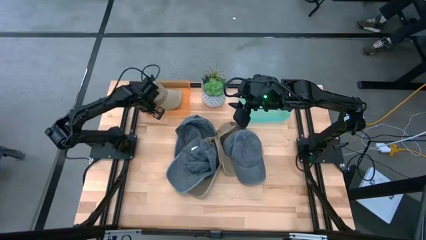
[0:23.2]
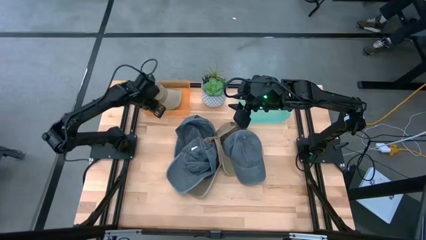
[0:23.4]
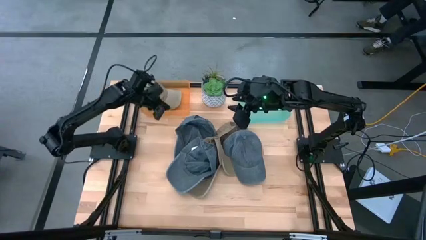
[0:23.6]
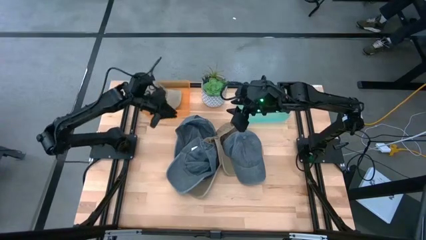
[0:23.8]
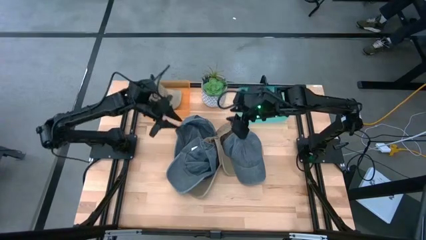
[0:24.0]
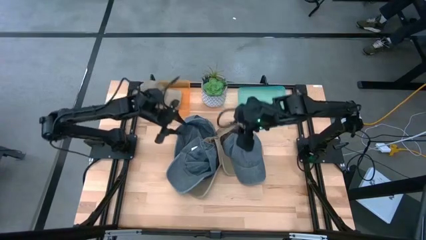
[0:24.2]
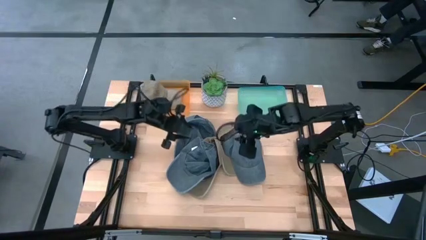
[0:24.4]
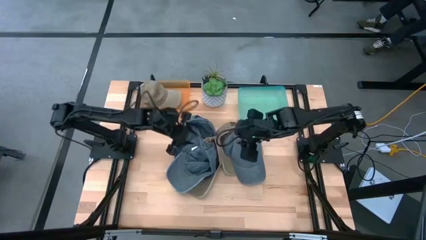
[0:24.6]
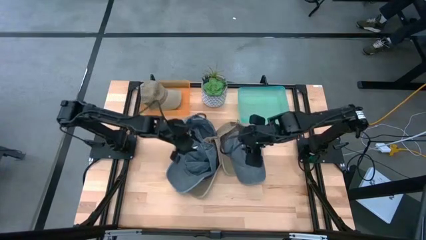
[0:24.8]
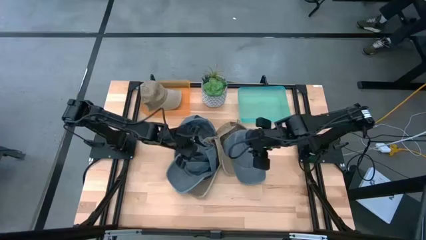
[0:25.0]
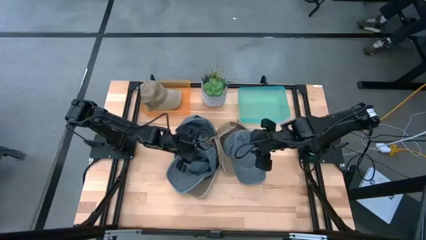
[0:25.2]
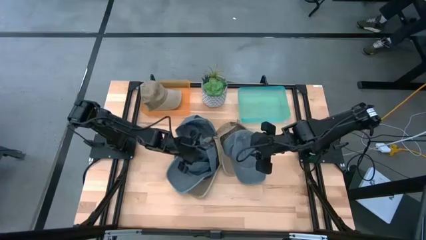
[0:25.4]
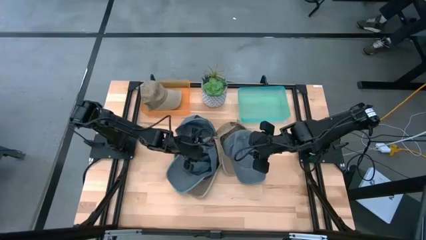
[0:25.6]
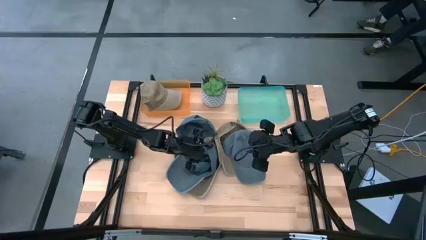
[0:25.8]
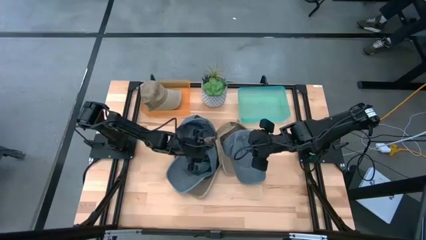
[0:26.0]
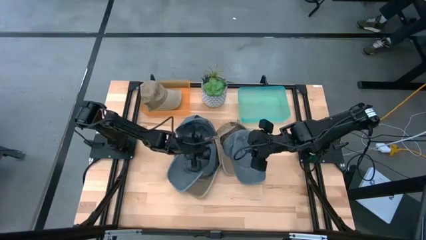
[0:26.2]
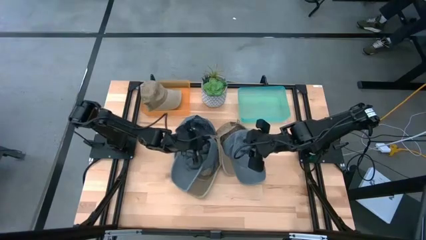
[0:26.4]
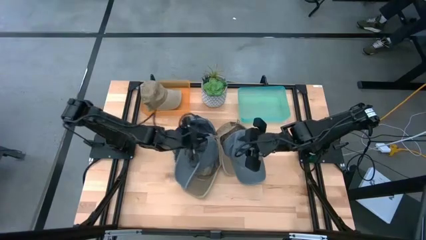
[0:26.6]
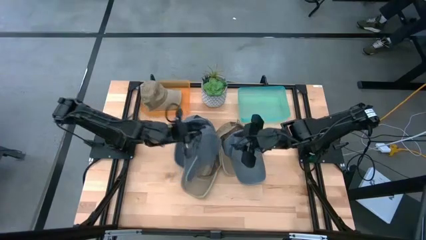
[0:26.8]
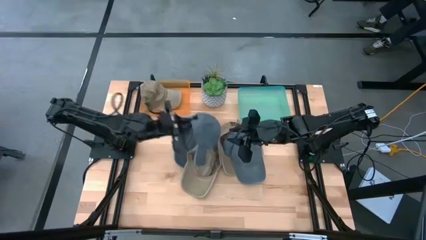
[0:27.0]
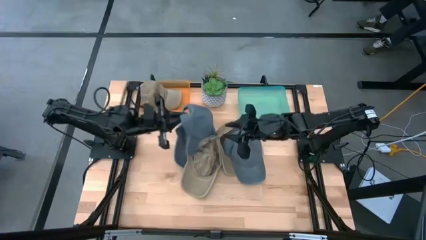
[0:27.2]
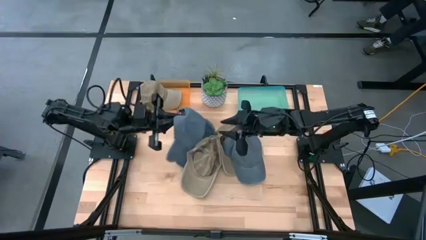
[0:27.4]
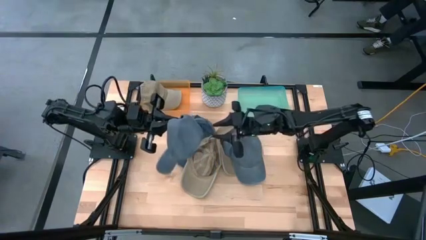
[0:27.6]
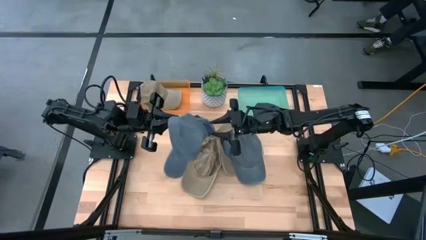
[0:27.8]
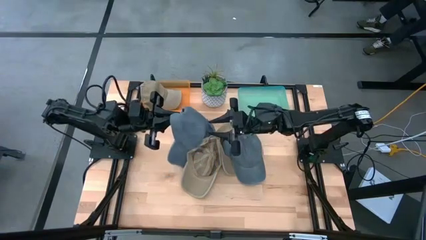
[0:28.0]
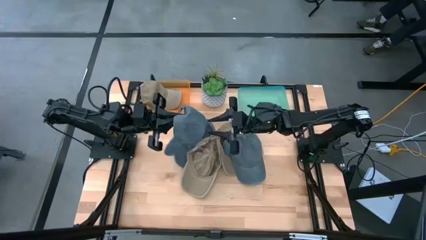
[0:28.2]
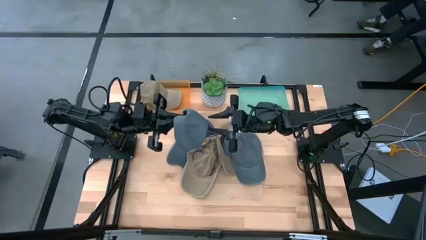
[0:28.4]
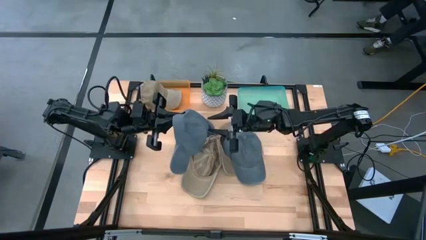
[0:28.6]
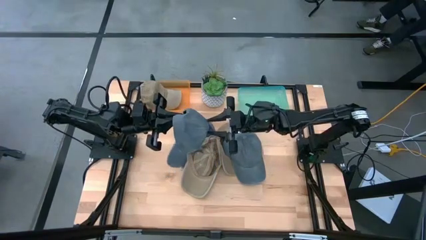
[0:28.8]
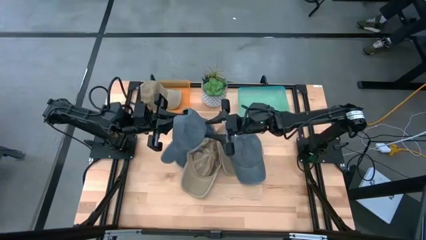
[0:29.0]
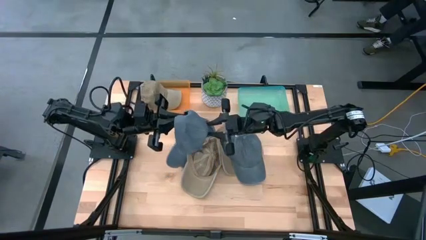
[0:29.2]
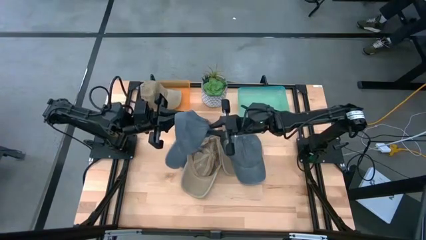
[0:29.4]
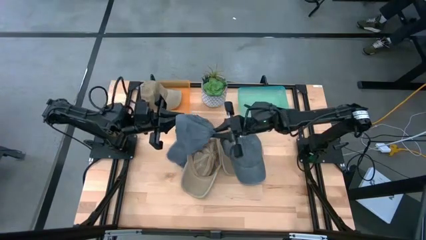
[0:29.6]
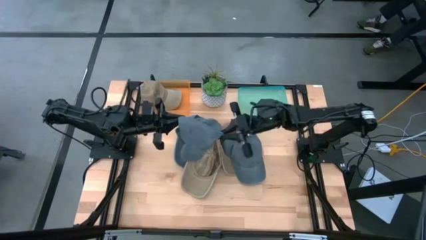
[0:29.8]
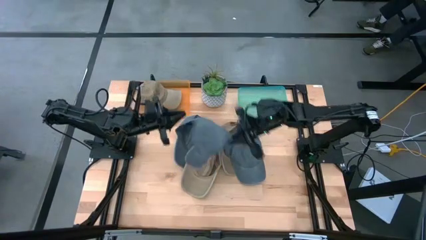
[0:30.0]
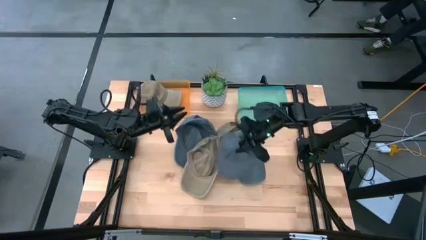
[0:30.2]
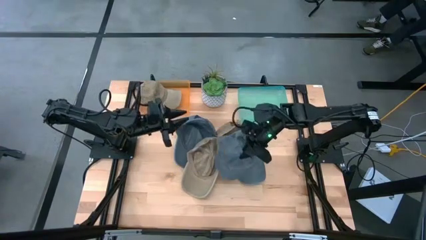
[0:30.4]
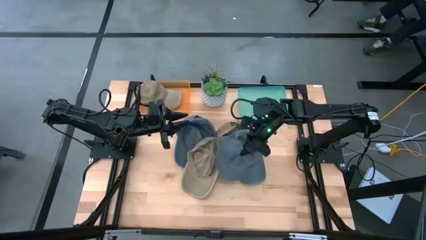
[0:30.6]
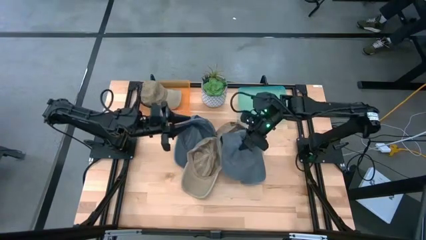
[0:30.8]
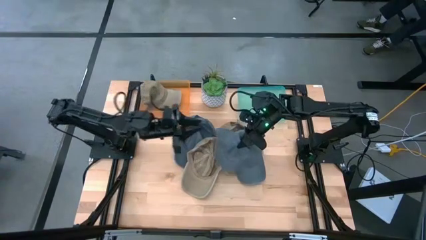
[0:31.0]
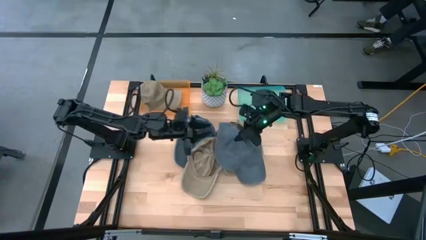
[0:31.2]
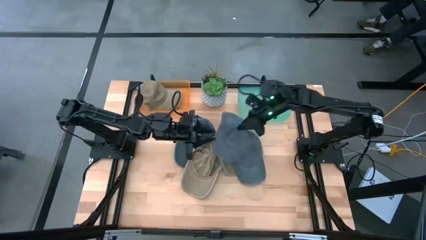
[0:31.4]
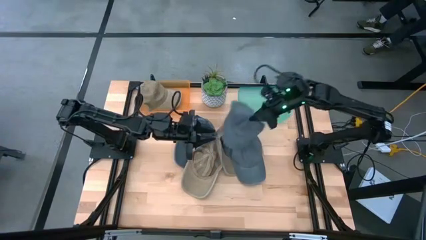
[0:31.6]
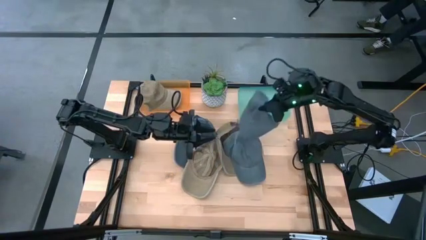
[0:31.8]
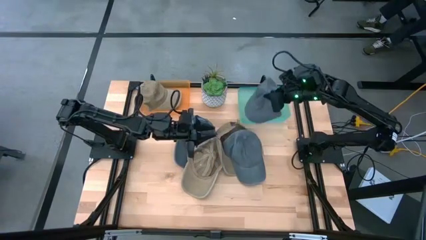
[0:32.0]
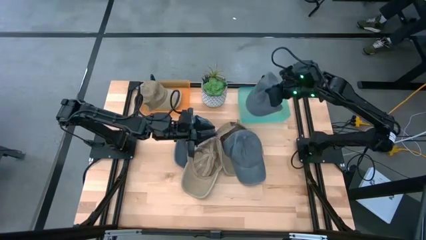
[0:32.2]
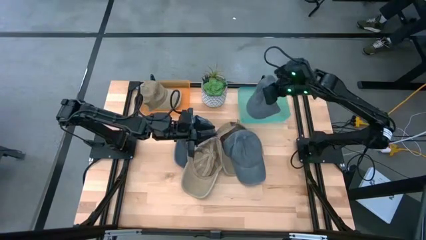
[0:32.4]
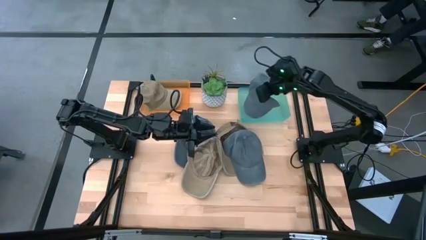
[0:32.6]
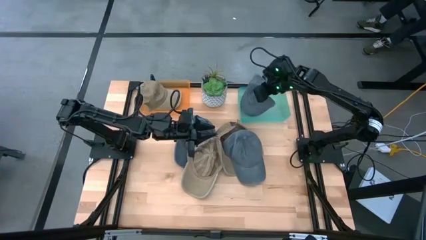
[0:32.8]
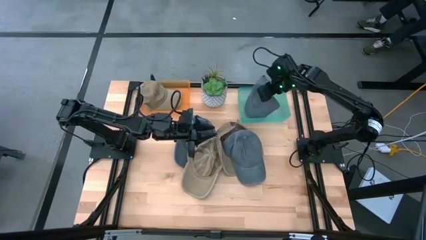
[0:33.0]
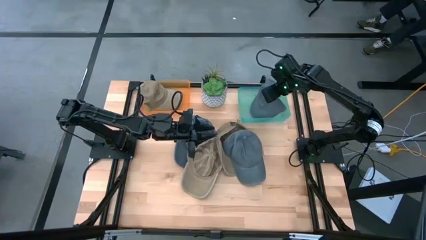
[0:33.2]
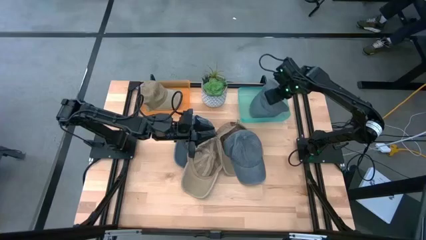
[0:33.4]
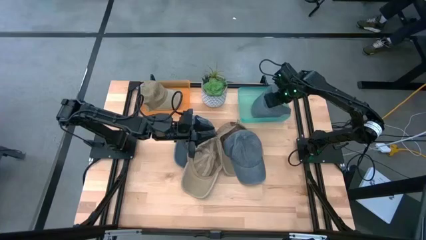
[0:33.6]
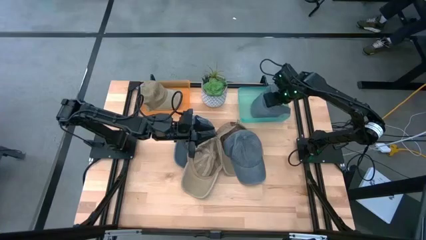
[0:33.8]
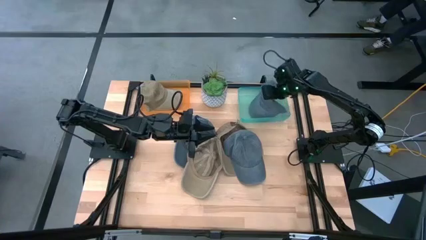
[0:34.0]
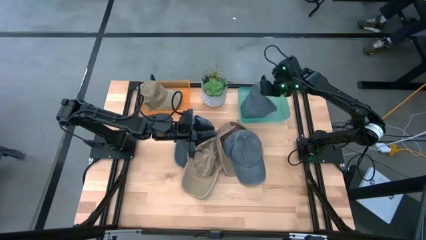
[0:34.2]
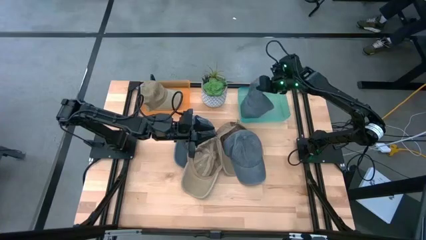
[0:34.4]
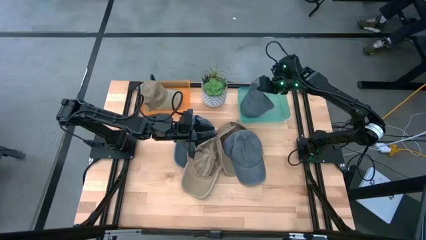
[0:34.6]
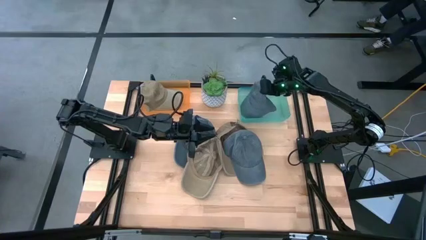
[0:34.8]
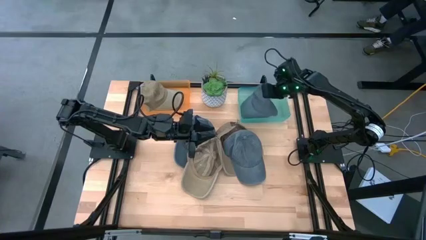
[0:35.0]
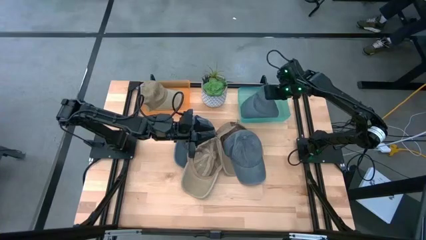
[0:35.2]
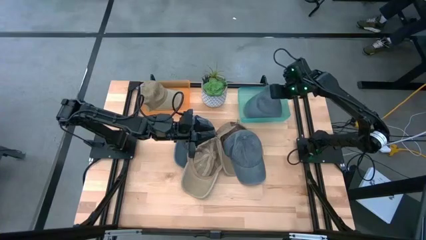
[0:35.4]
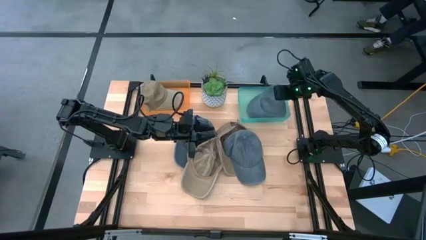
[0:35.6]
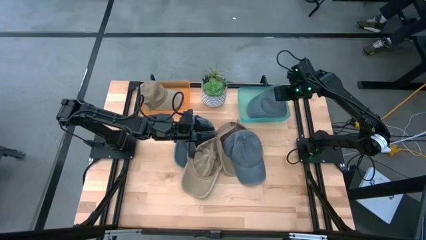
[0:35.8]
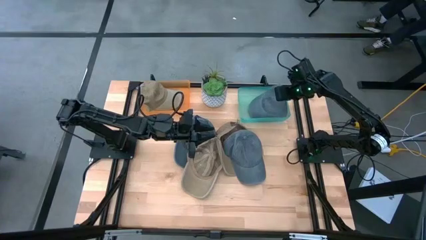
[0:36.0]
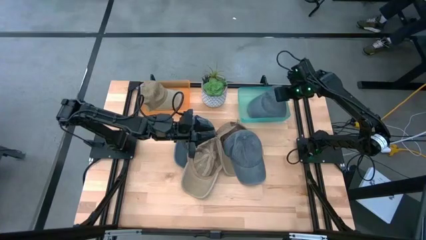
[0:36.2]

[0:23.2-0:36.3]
Task: Pick & Place hat
Put the middle gray cap into the green bin

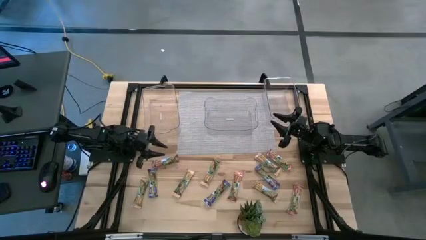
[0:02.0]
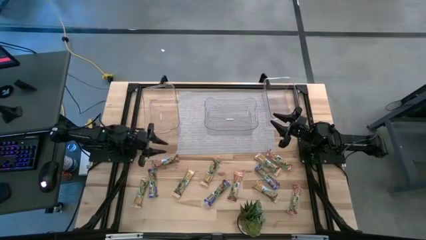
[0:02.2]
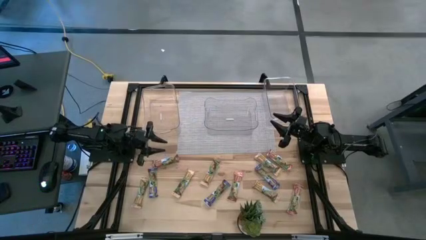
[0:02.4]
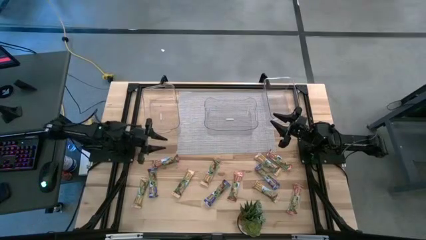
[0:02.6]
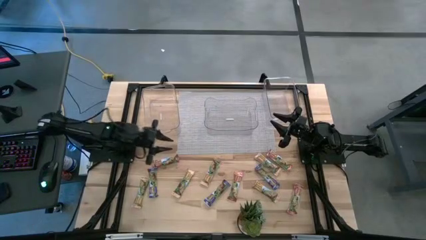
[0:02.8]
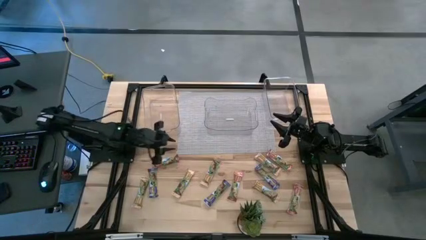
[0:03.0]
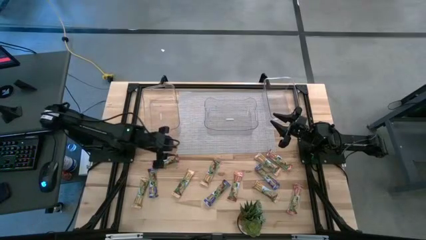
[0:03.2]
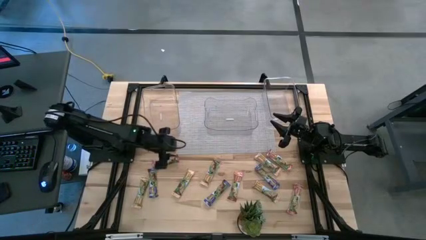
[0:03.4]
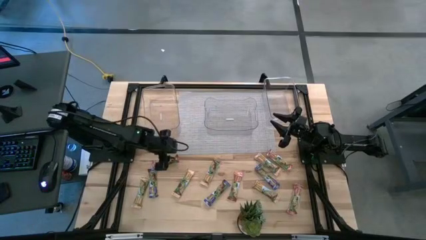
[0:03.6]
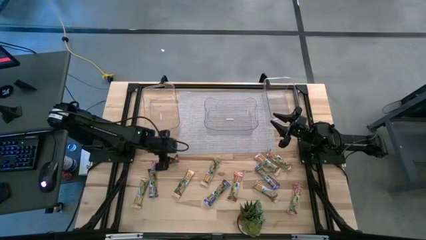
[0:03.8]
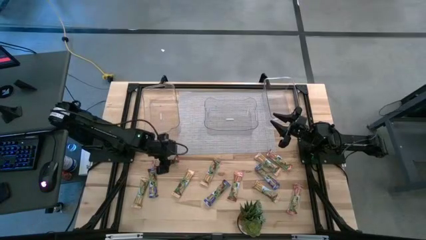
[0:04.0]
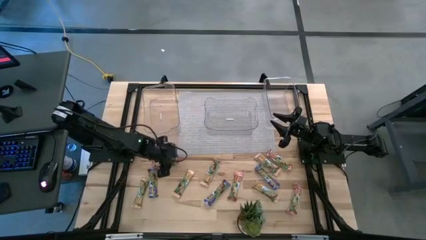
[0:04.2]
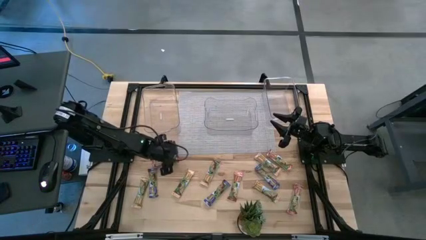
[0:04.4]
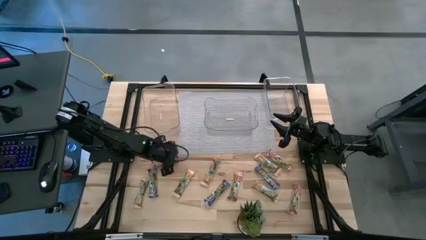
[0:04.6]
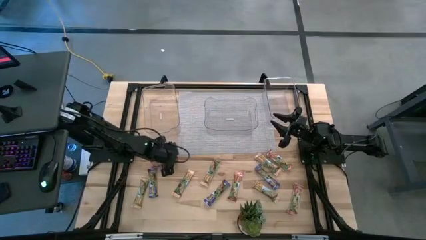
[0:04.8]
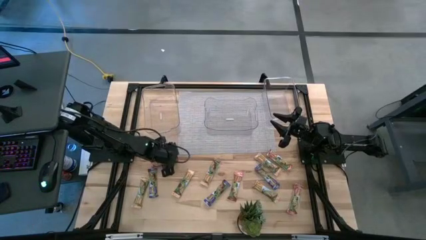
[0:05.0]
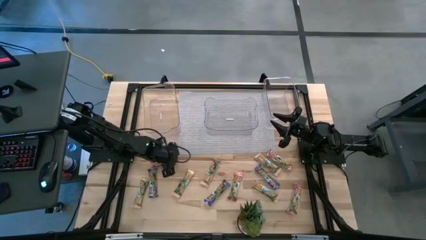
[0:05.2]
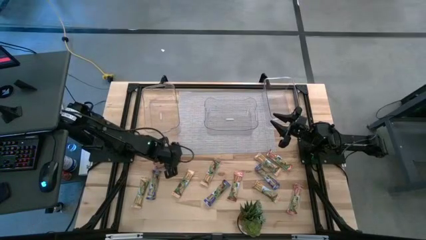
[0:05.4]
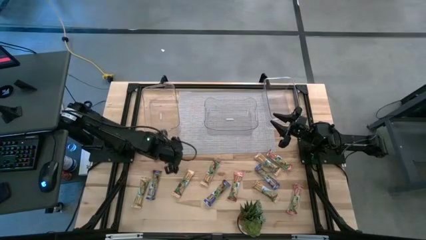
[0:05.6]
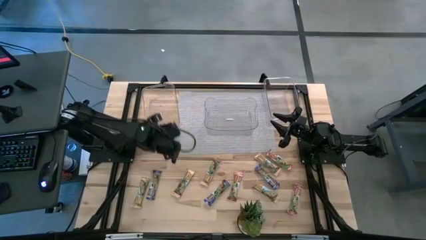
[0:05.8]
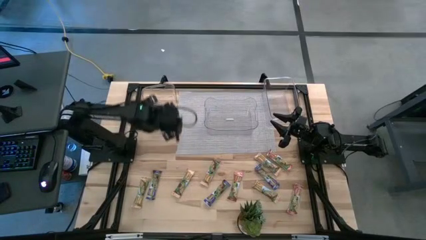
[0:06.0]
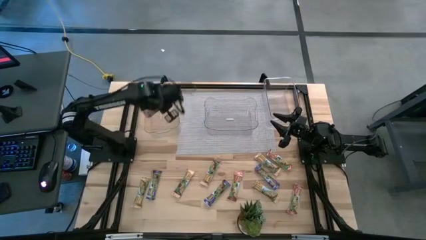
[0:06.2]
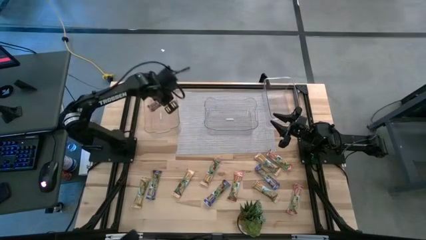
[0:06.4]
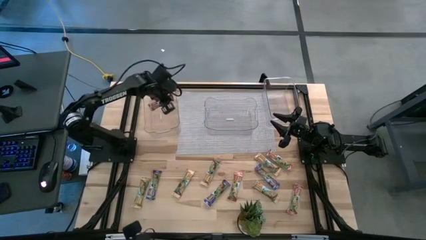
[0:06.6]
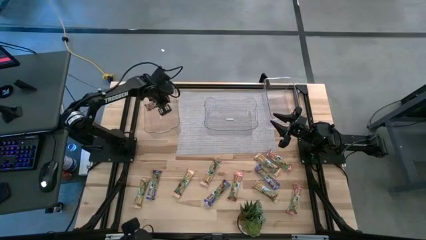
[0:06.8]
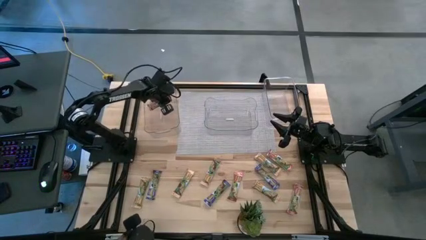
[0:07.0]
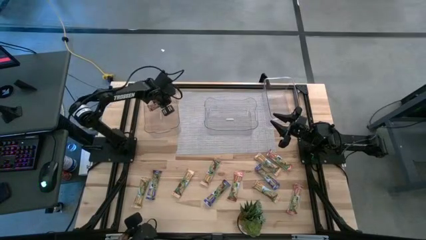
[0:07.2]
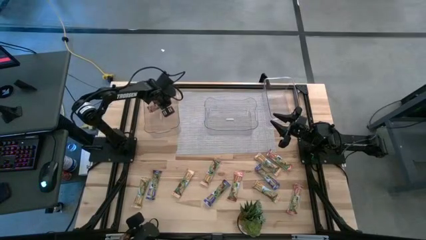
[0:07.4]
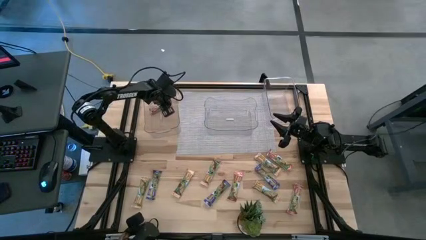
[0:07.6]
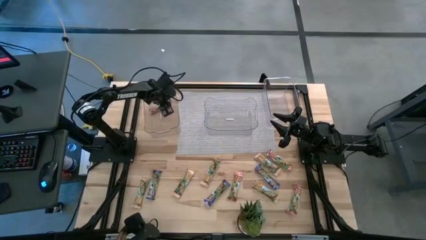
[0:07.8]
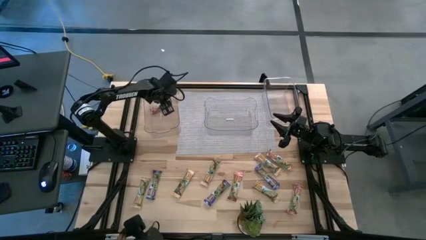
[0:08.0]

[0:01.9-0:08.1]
Task: Pick and place Granola Bars by type
Put the red granola bar into the left transparent bin
